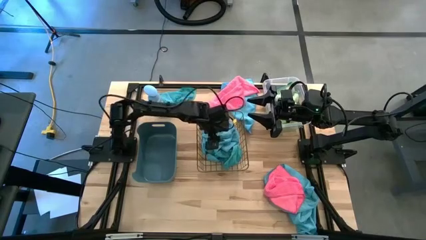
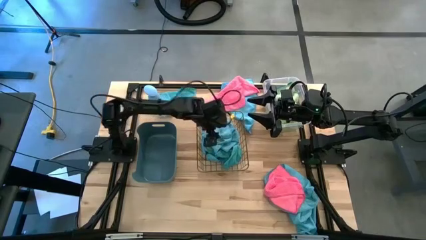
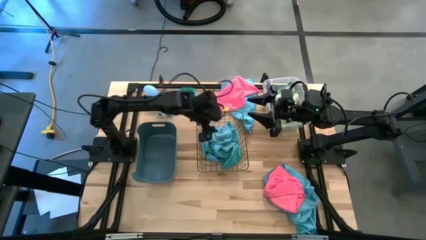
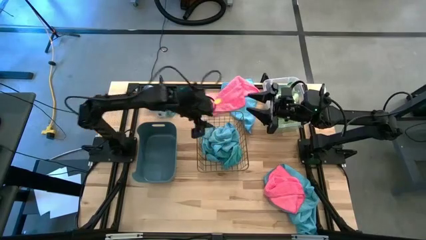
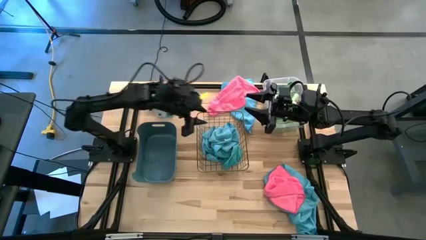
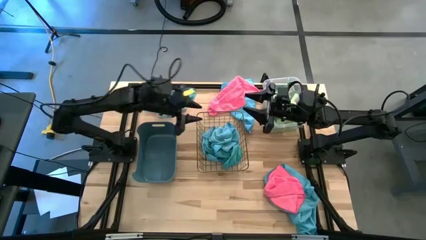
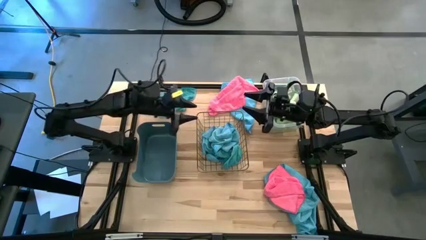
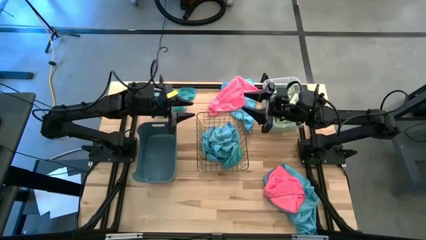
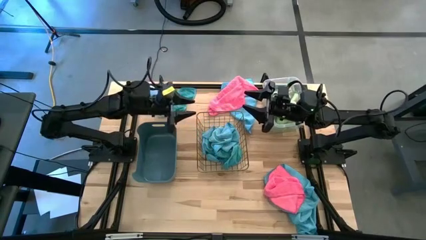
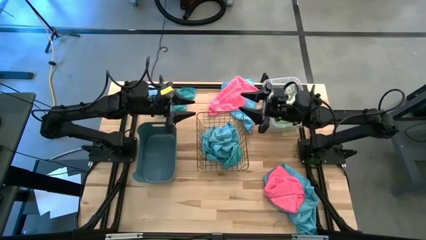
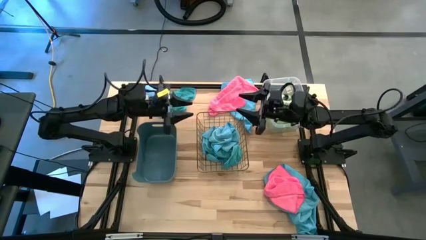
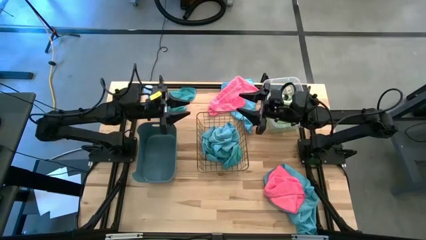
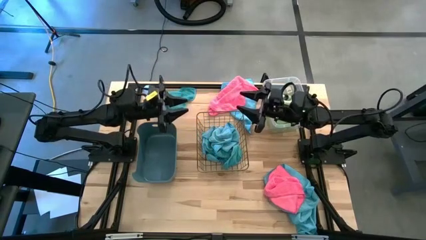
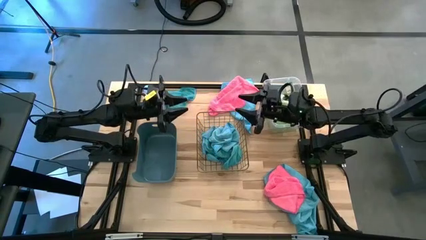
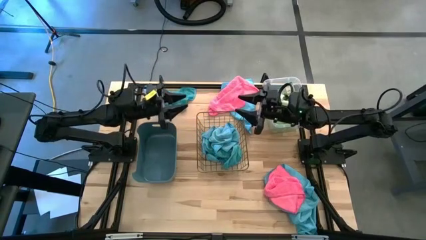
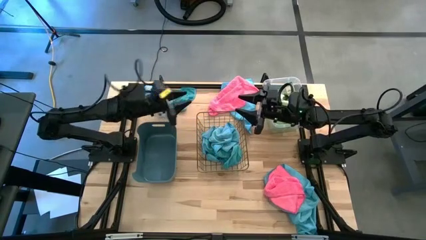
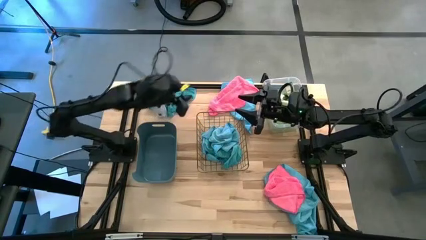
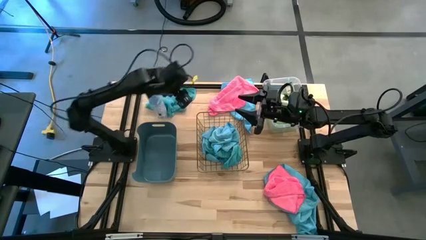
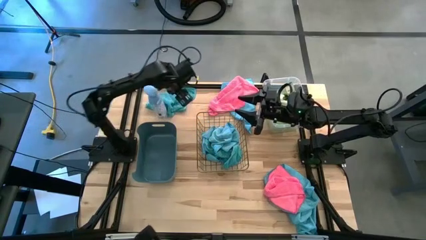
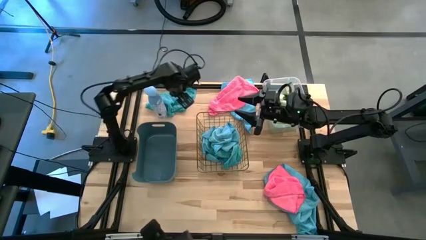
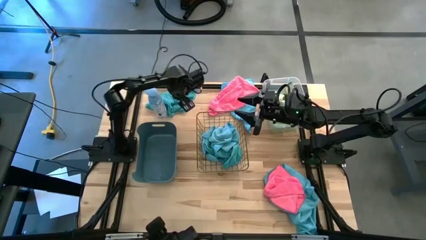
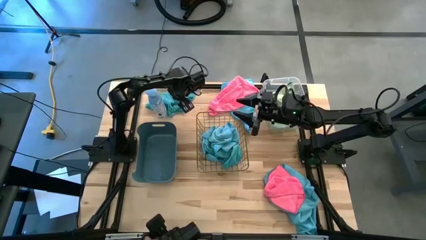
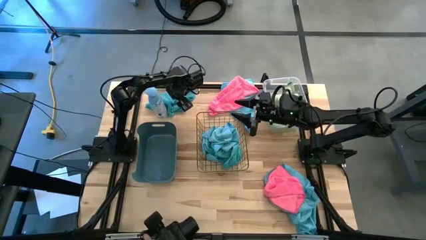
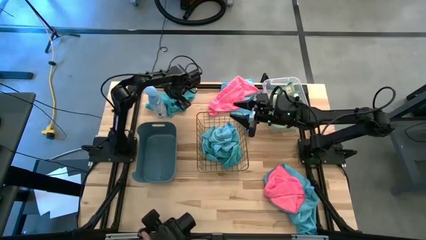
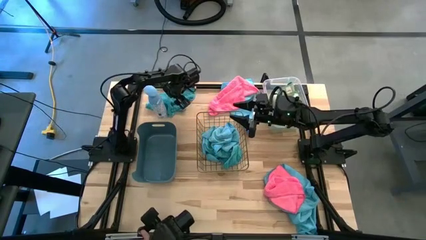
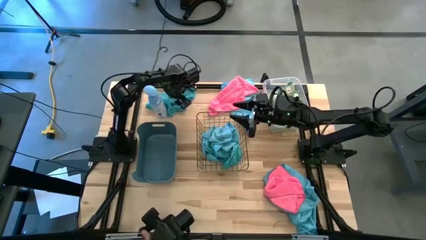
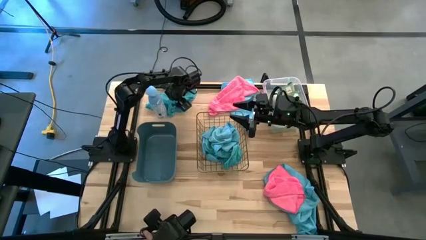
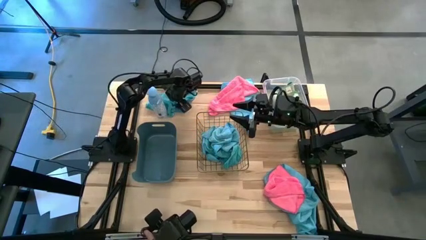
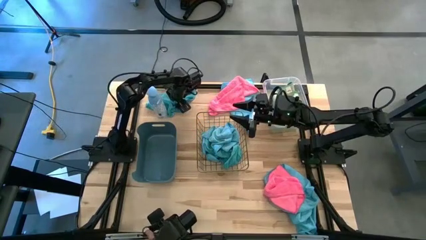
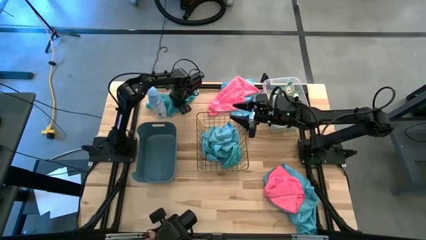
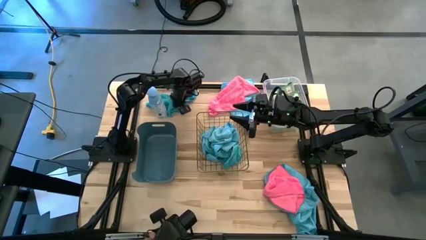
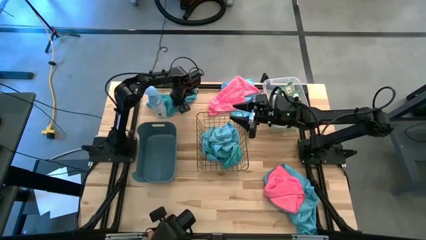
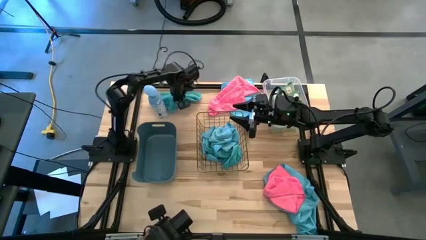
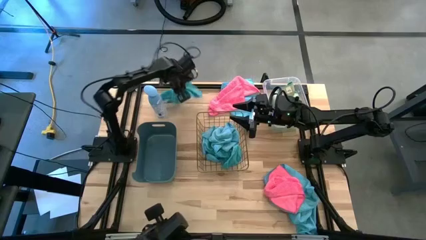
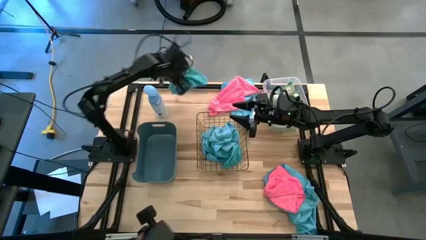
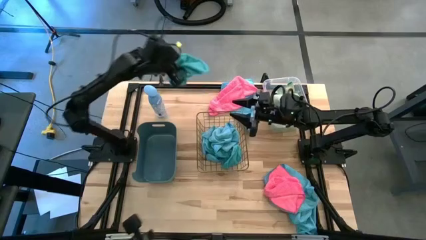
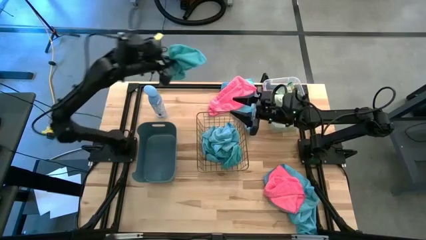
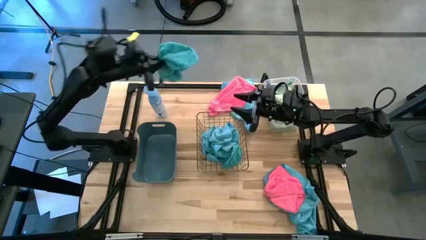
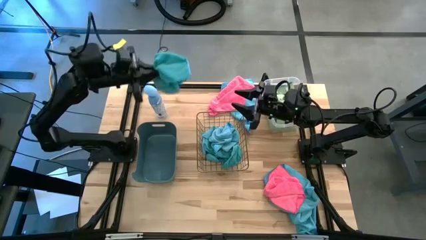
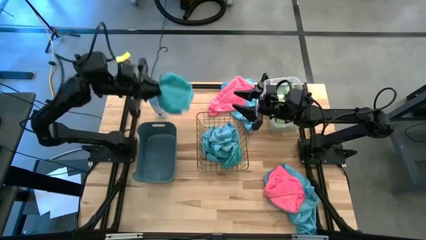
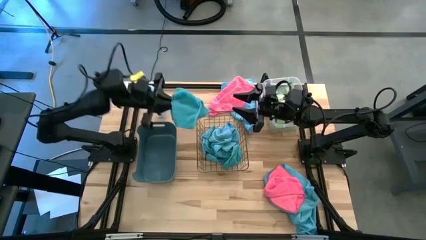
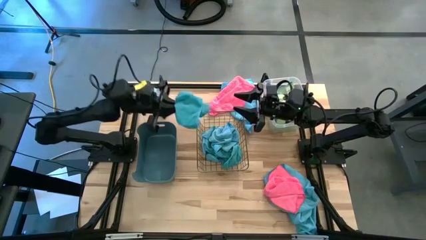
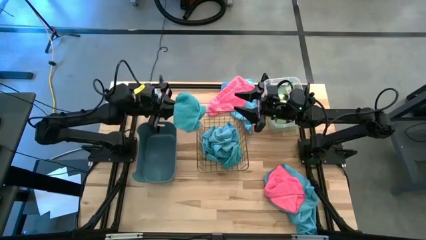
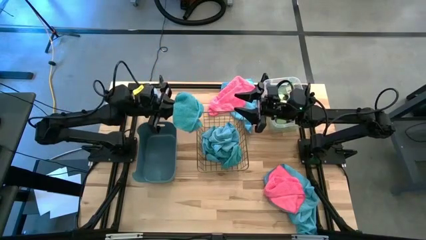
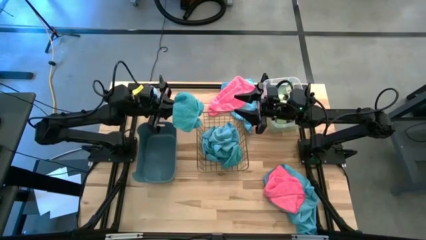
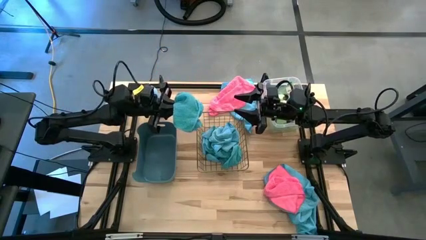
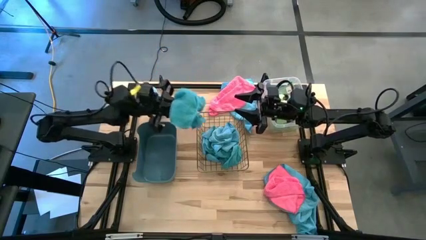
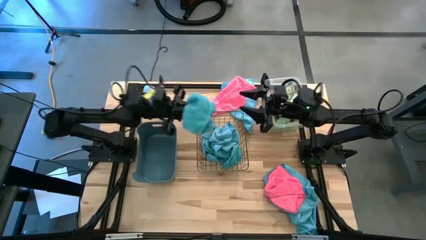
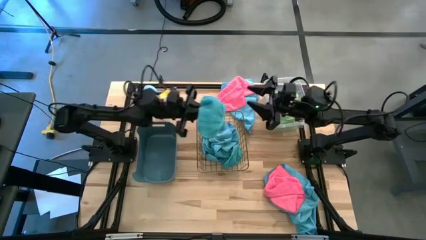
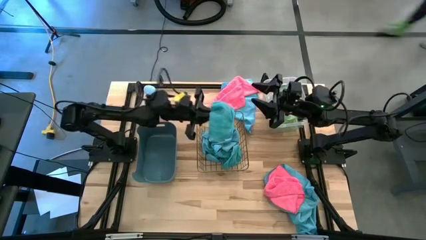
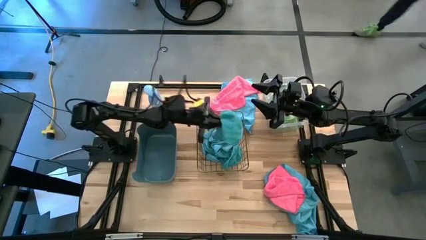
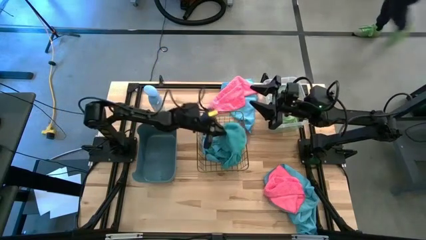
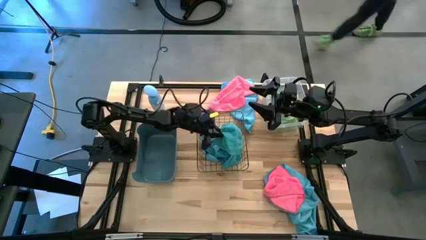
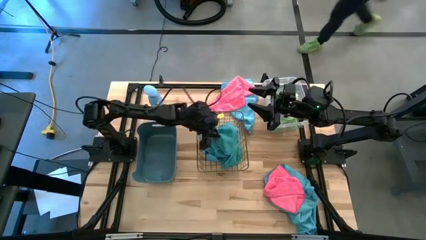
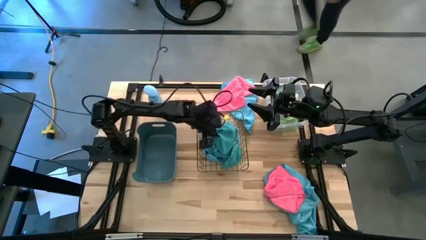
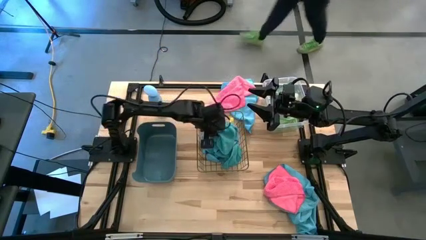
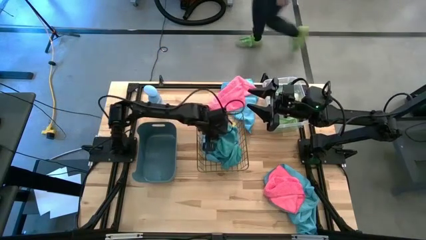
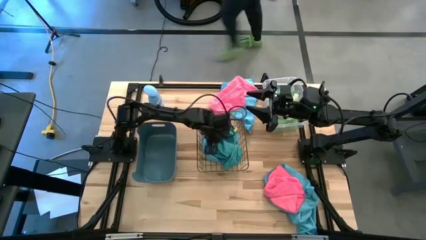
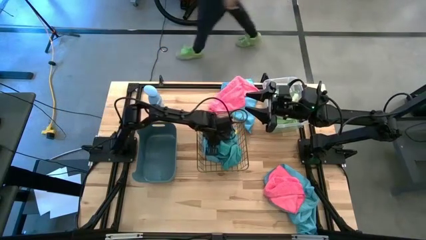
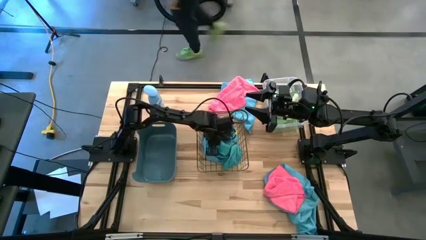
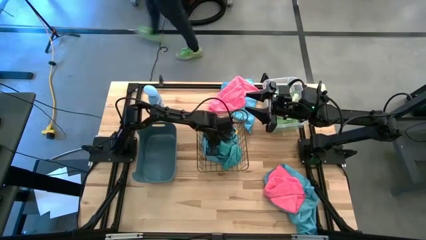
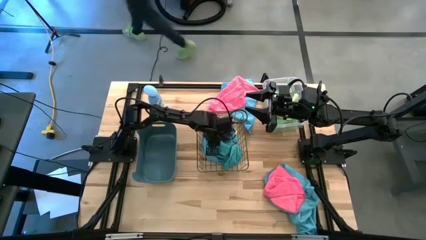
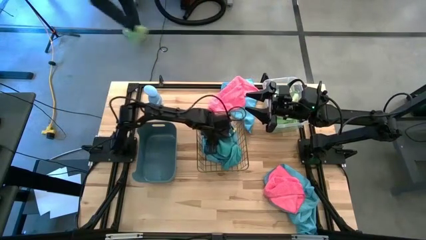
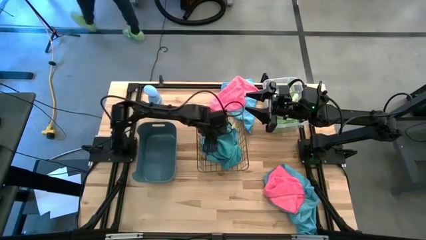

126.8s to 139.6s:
Task: Sort microfiber towel by color & place in baskets
Put the blue towel into the wire basket
